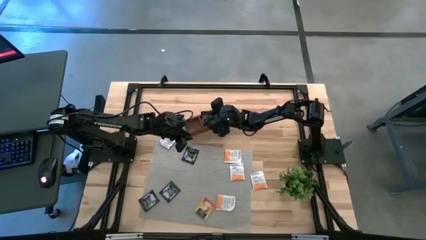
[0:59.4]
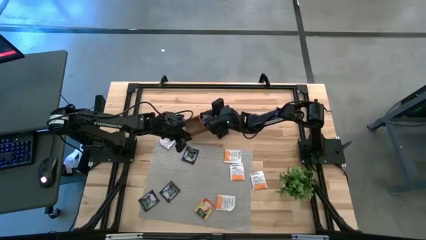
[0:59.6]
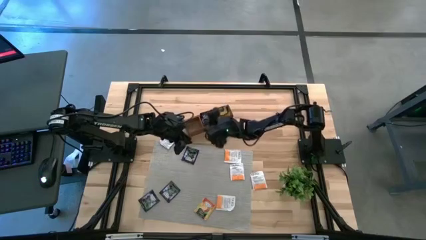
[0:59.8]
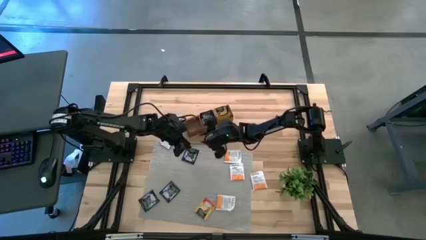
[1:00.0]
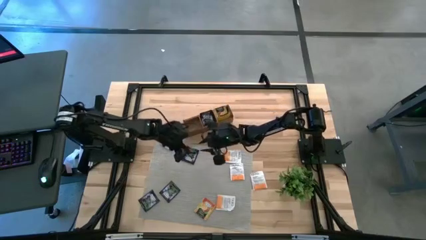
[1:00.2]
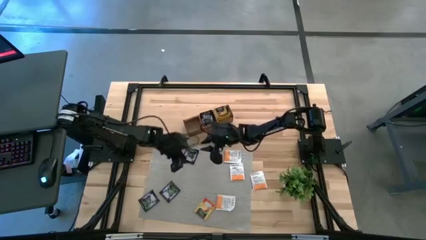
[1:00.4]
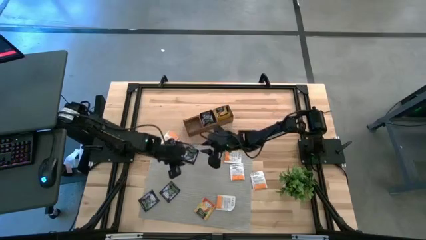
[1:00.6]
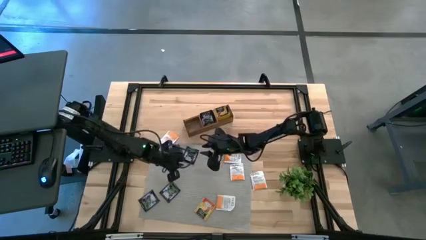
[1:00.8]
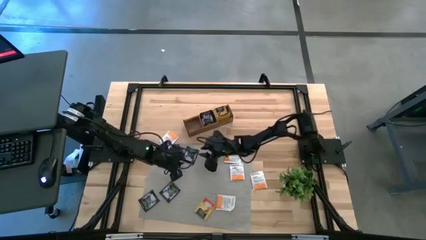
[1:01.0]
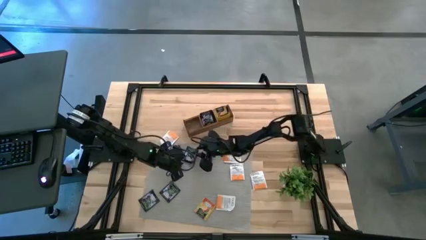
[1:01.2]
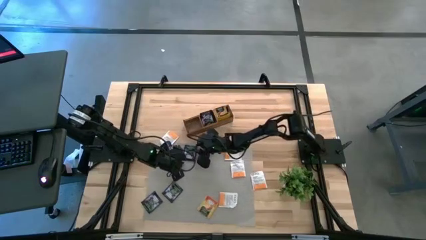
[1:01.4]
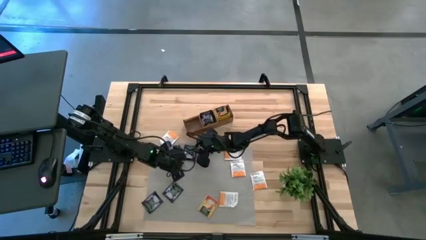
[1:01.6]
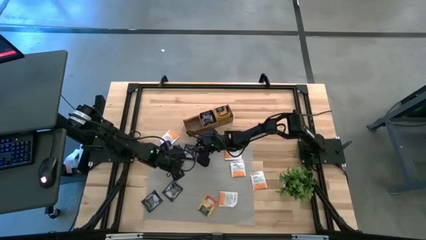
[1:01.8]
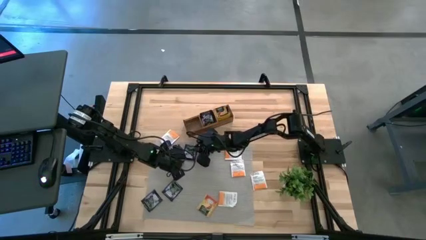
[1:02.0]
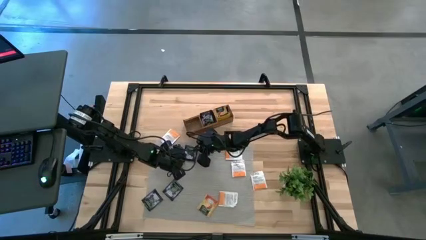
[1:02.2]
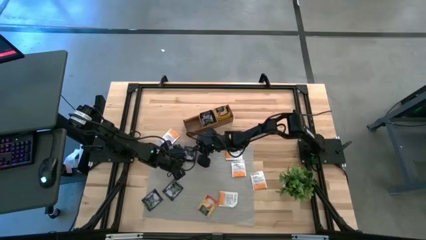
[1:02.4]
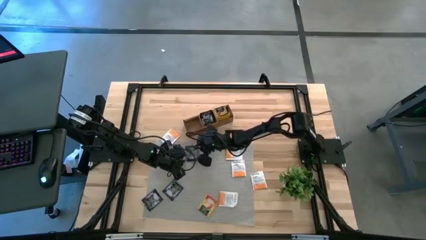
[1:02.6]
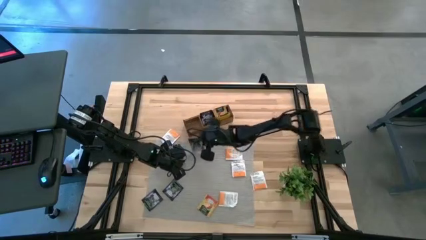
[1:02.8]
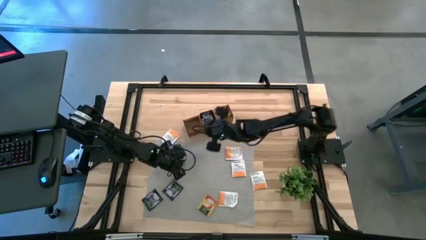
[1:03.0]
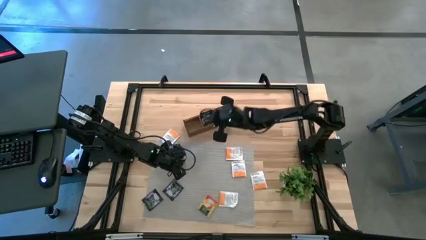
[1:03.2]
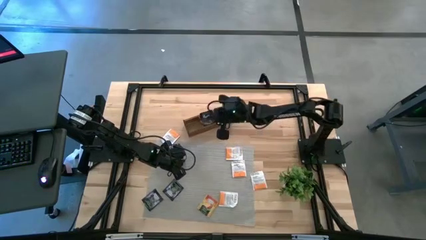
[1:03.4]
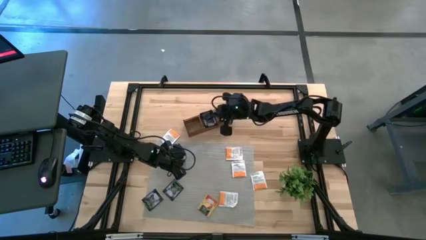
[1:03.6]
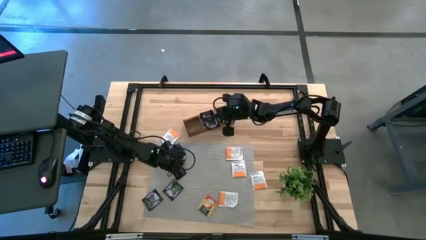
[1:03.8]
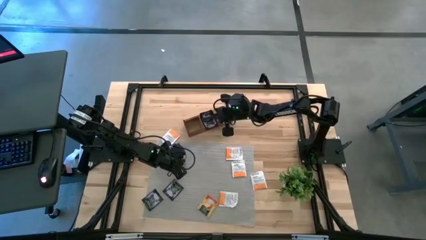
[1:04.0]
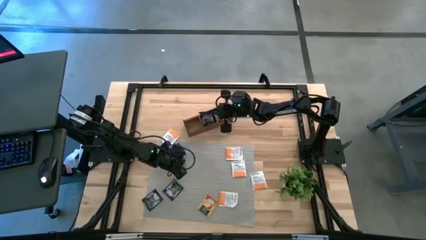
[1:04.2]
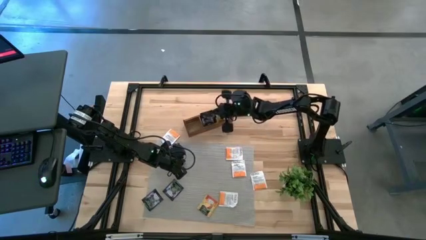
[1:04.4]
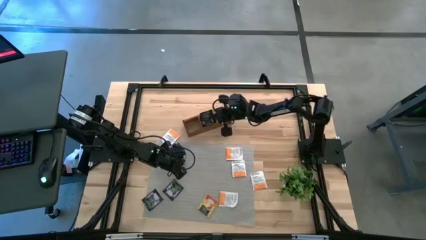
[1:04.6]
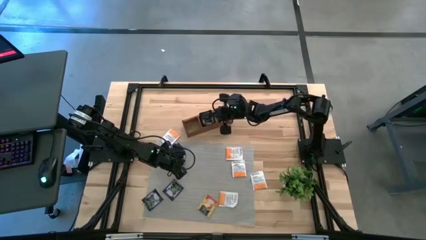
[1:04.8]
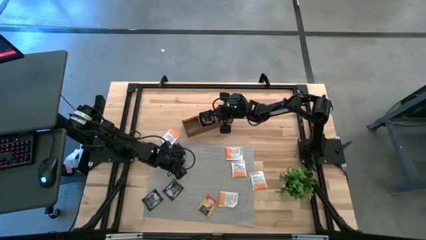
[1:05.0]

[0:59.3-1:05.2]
Task: Pick & Place Tea
Put the violet tea bag into the middle section of the wooden organizer

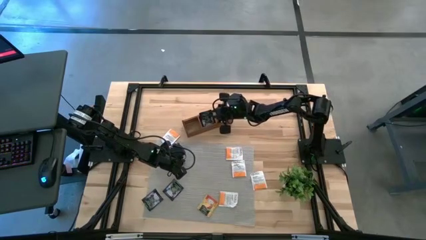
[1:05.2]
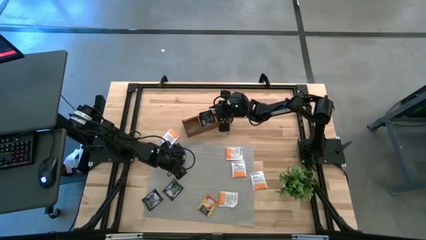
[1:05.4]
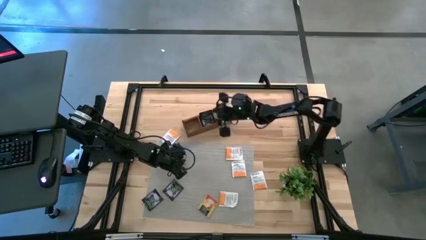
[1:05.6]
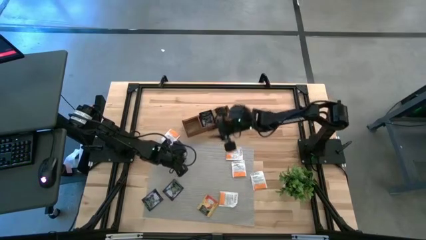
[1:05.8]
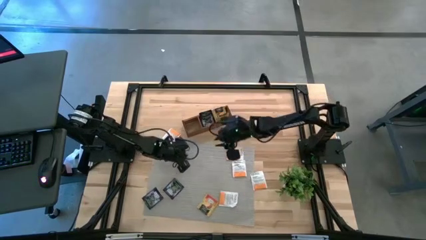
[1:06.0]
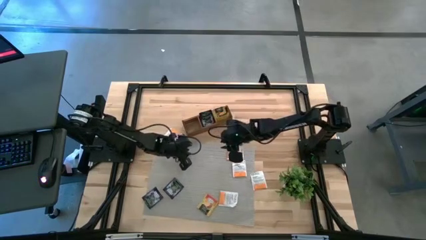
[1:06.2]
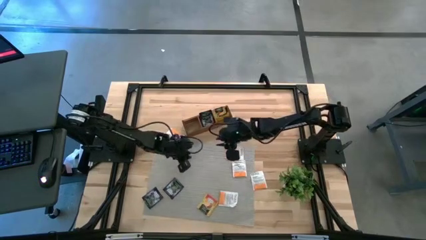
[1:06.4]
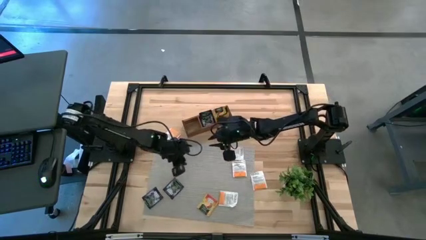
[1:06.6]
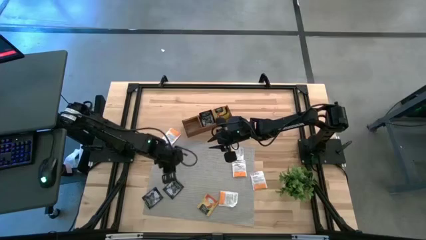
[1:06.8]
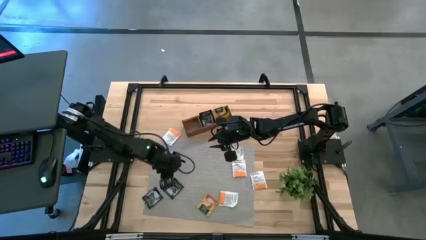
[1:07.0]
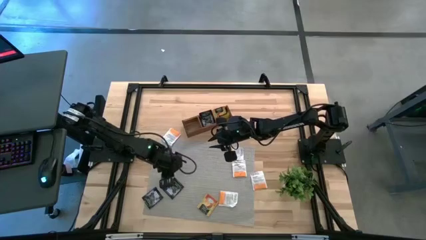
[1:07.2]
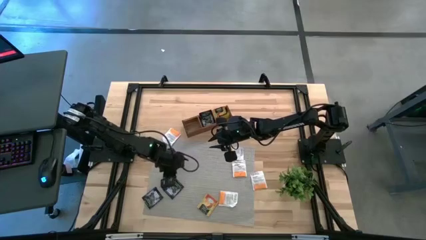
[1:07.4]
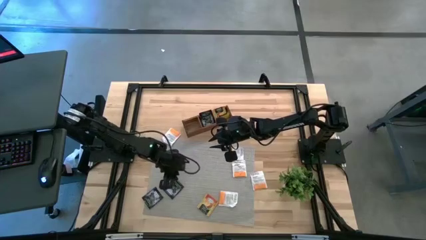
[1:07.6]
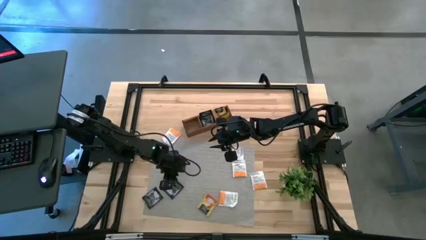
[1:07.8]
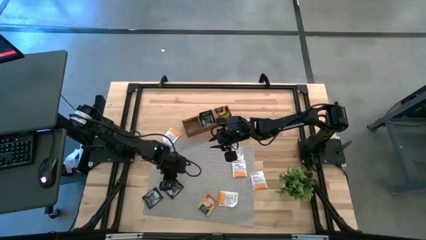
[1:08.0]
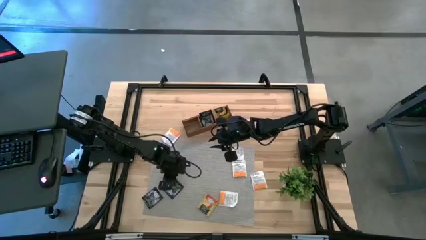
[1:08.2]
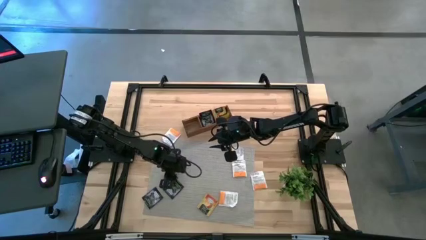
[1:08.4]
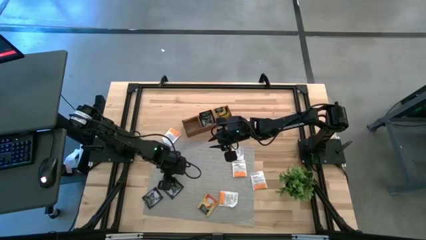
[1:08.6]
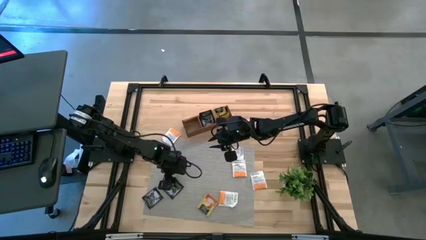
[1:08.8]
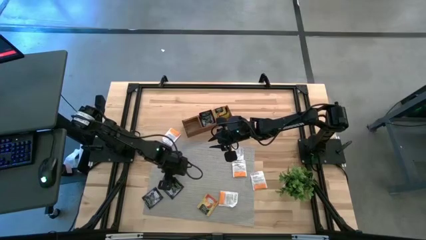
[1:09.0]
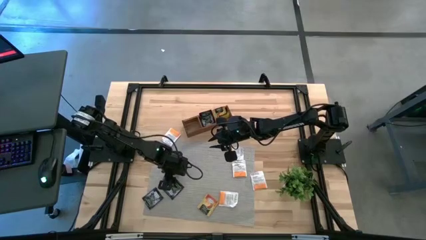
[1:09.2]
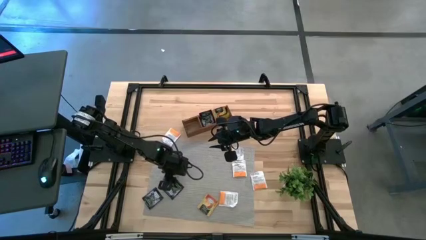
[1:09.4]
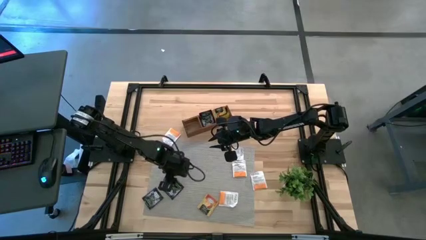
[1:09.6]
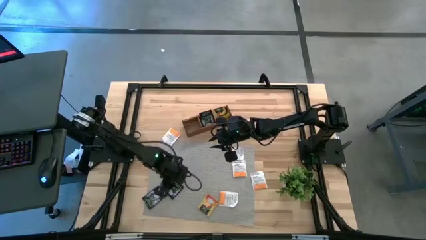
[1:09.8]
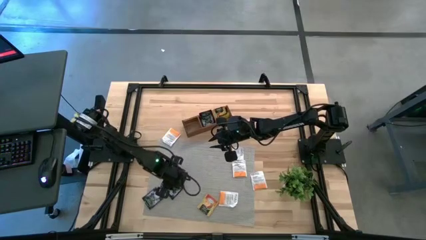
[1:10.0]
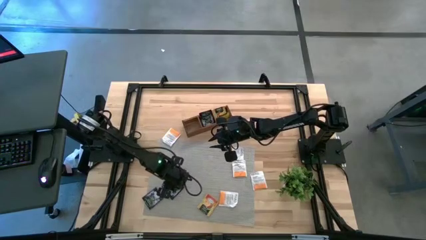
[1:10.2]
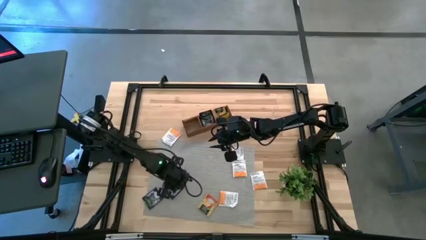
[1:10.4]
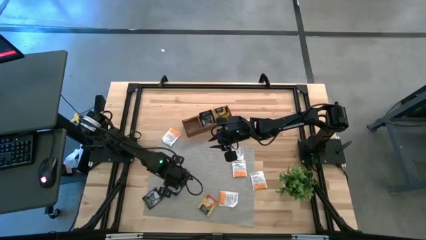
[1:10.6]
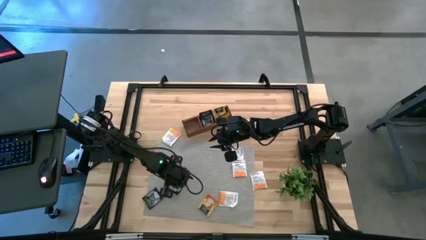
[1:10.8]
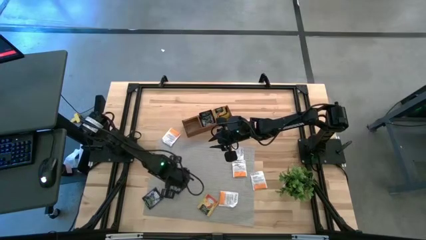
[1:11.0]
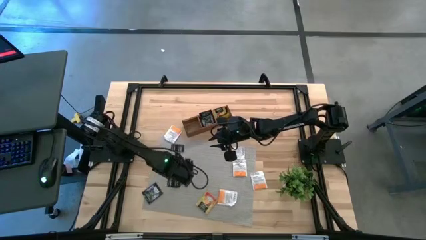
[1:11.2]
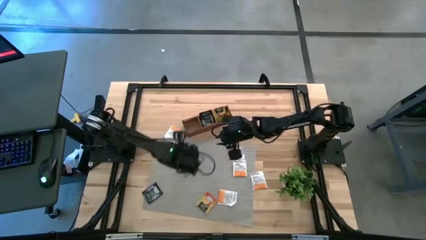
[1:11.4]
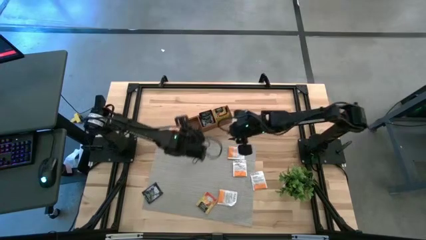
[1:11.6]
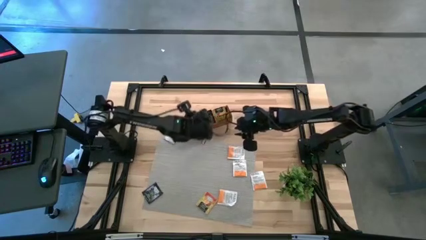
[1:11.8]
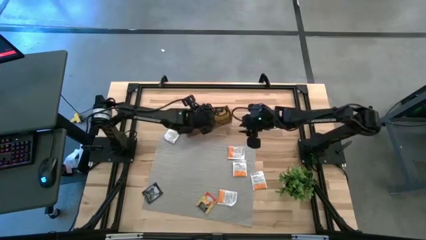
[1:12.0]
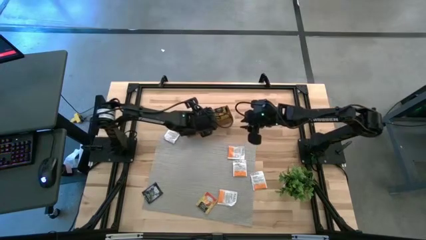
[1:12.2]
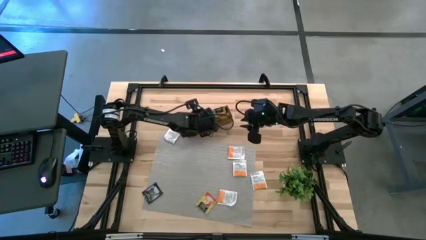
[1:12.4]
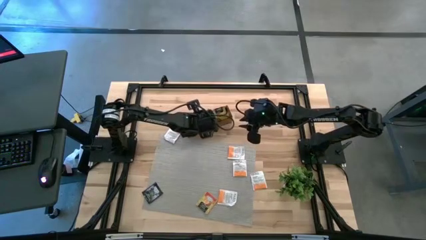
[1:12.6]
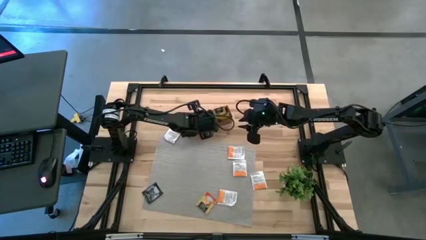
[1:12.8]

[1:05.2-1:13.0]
Put the violet tea bag into the middle section of the wooden organizer
